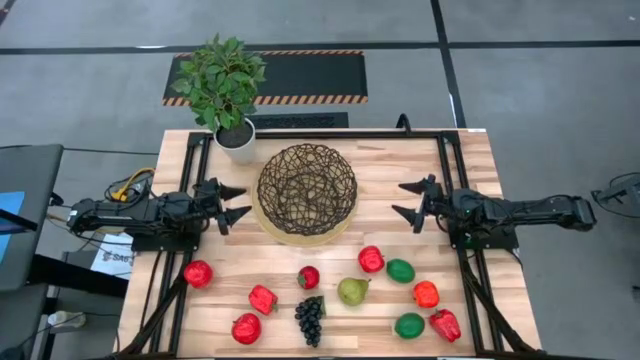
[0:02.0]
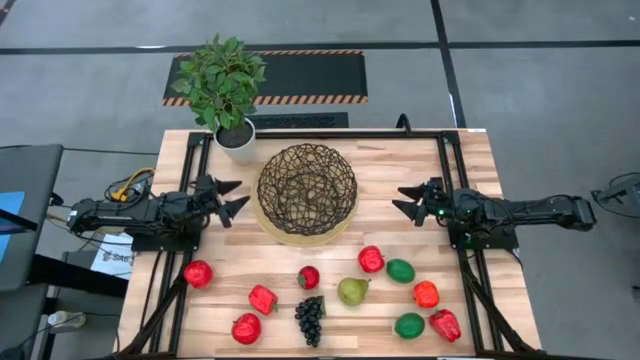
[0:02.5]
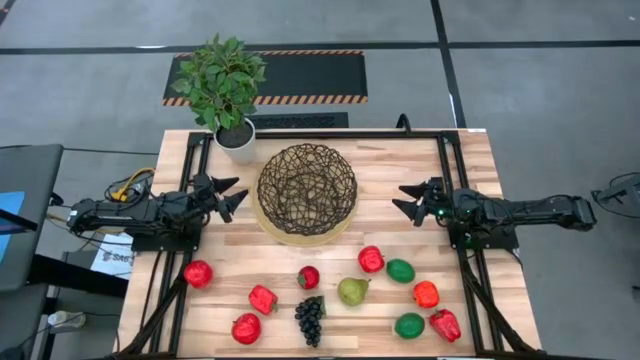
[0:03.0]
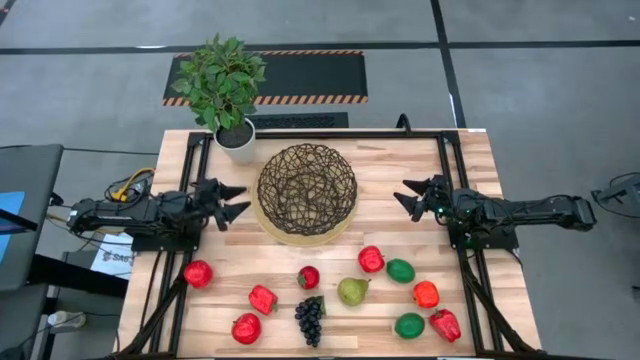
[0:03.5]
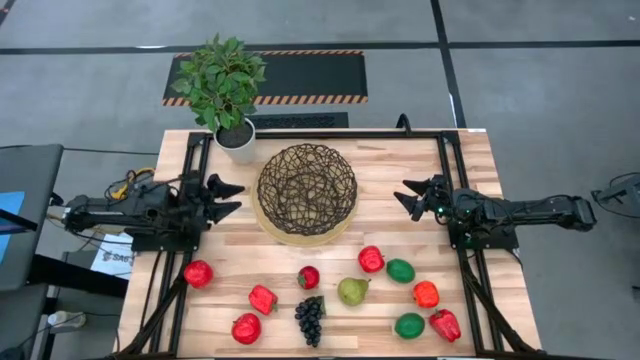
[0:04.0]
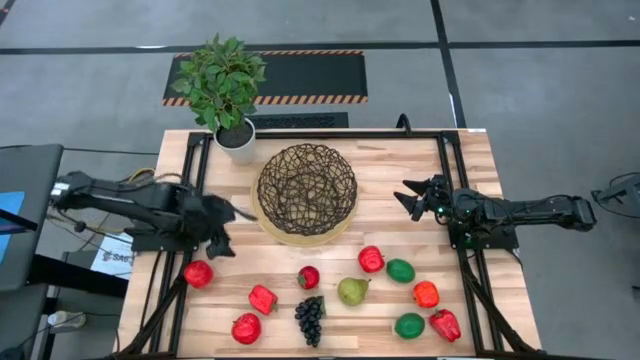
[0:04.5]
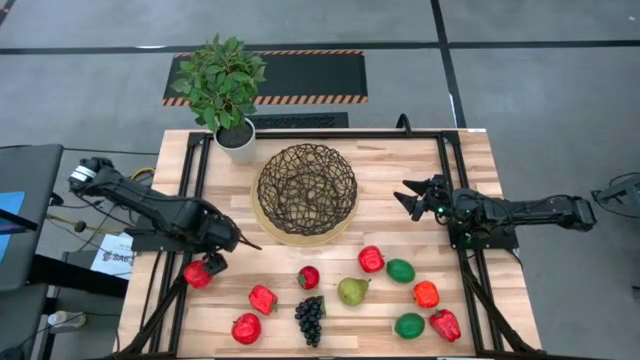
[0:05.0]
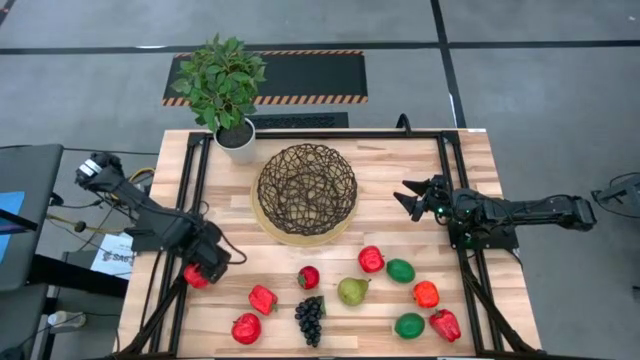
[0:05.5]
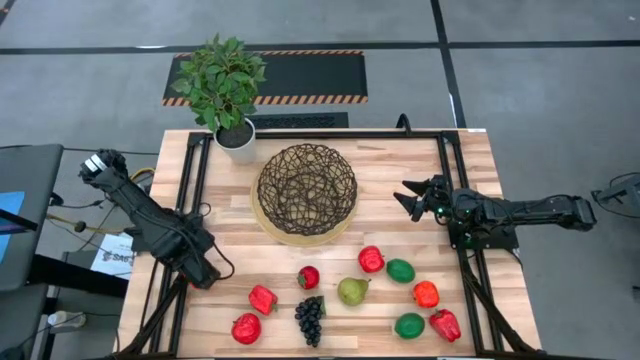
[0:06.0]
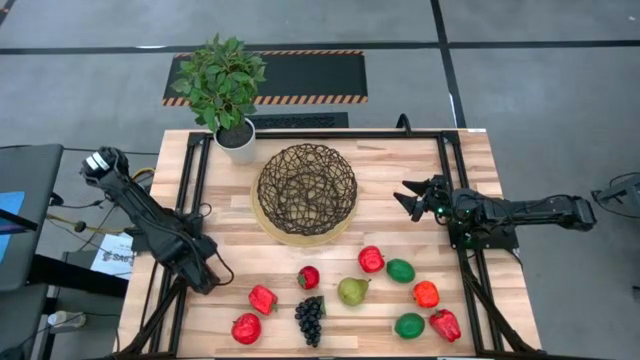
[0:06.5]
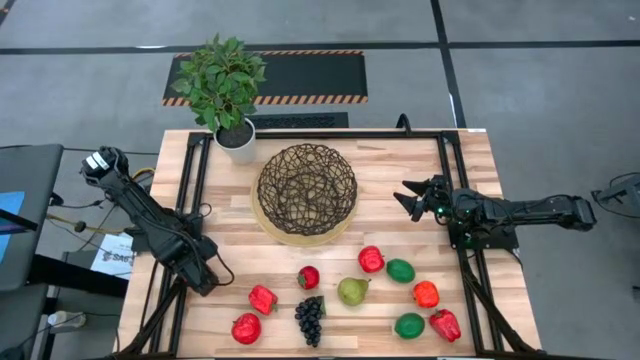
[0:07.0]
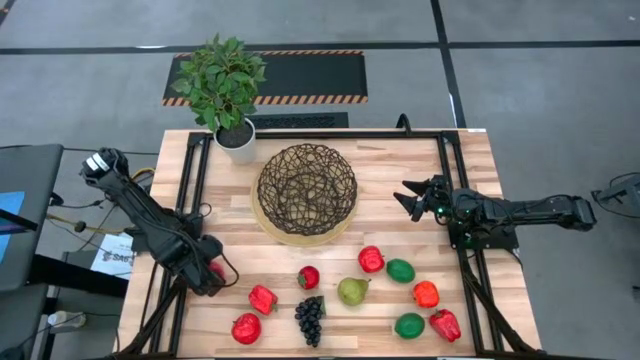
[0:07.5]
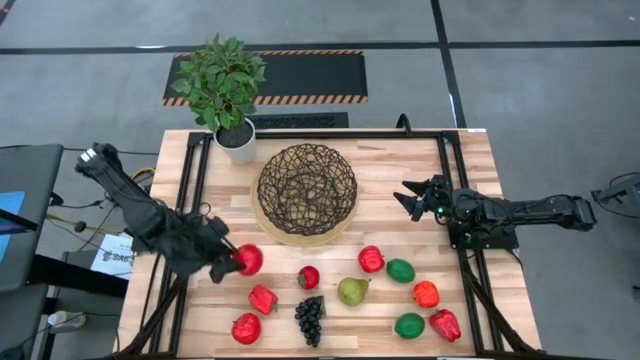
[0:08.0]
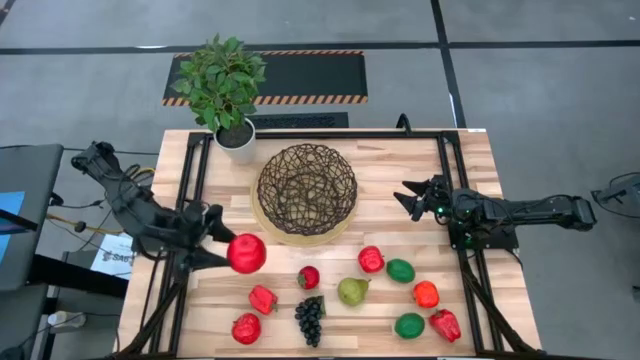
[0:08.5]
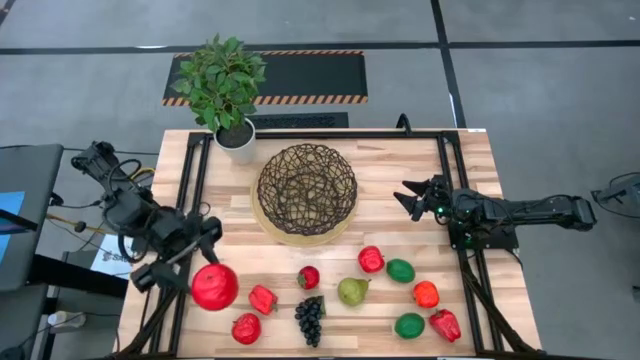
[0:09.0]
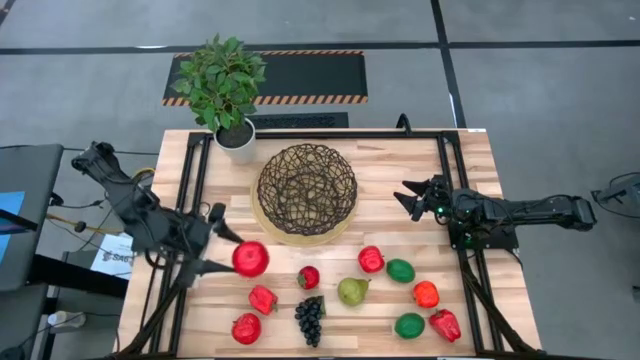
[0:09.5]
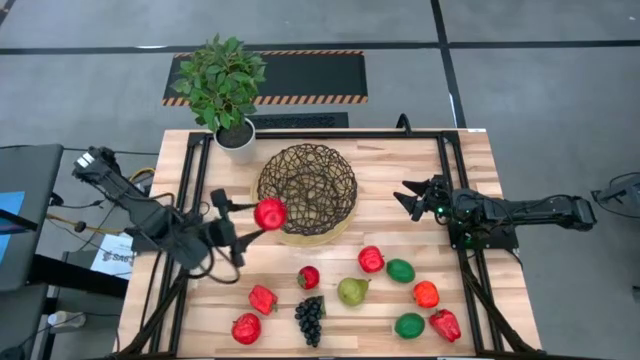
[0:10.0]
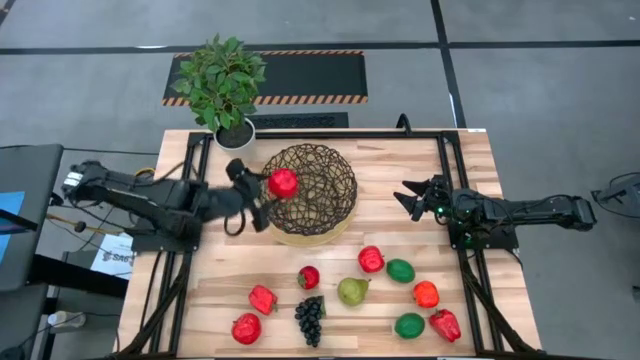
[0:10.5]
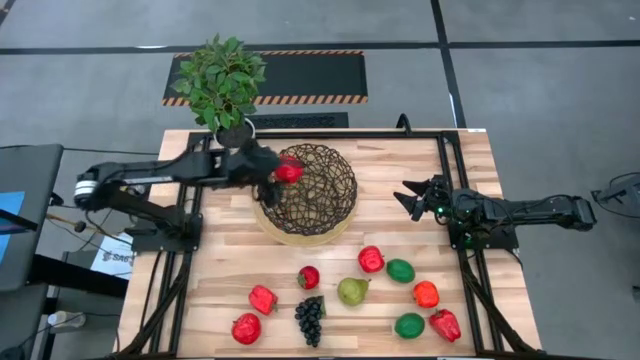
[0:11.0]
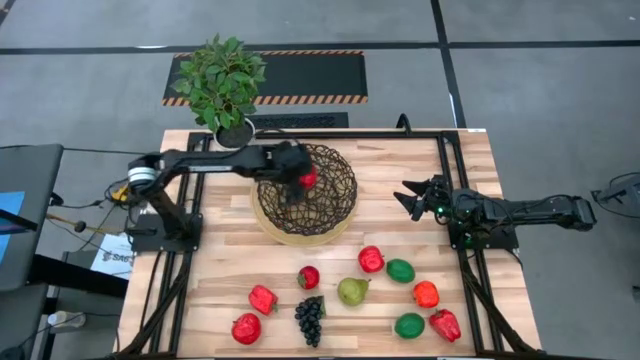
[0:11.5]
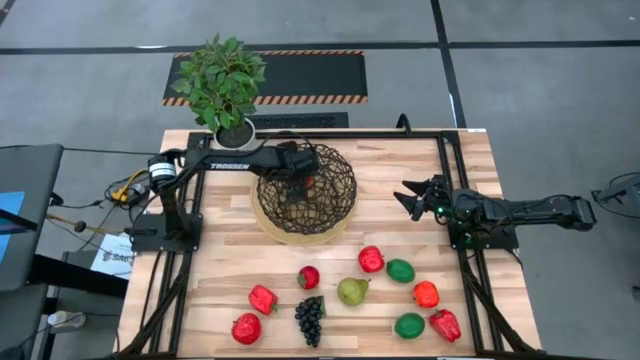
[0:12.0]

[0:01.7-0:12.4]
Task: Build produce basket
Put the toe left red apple into the basket

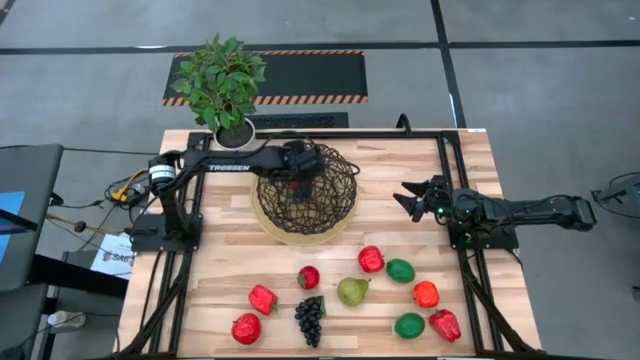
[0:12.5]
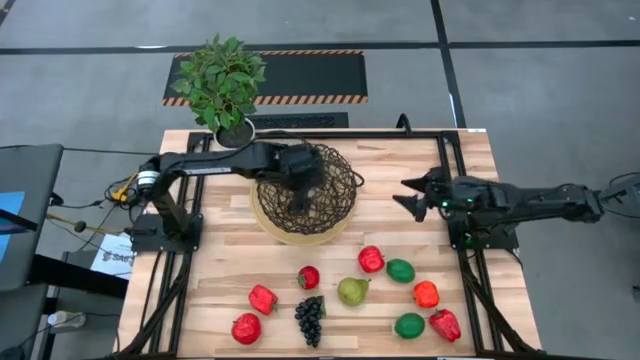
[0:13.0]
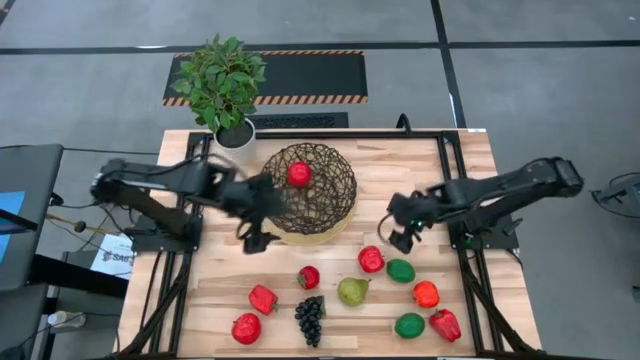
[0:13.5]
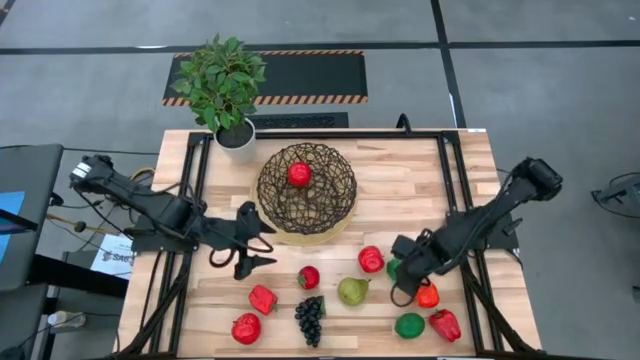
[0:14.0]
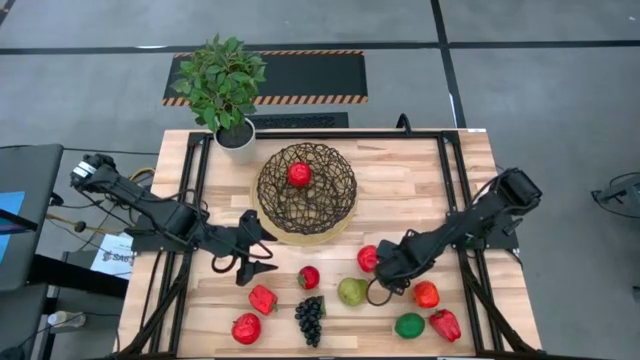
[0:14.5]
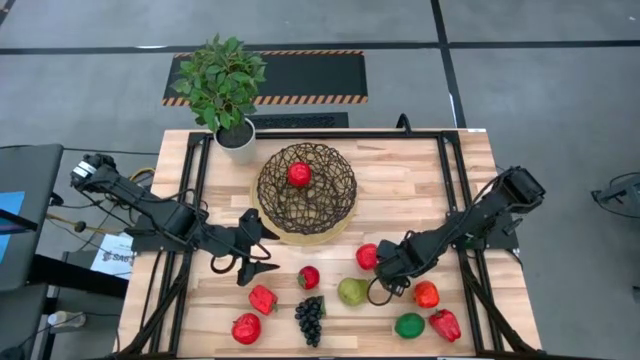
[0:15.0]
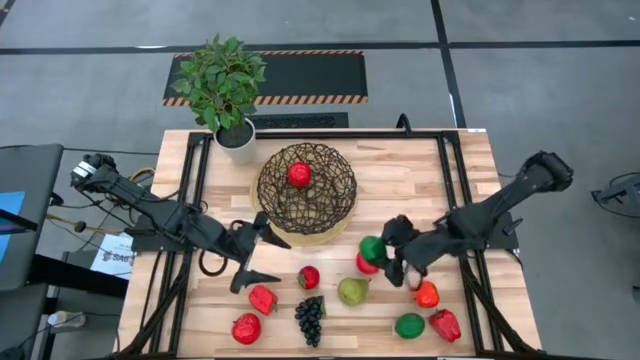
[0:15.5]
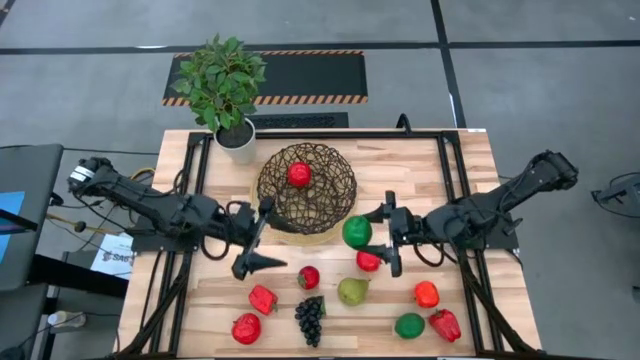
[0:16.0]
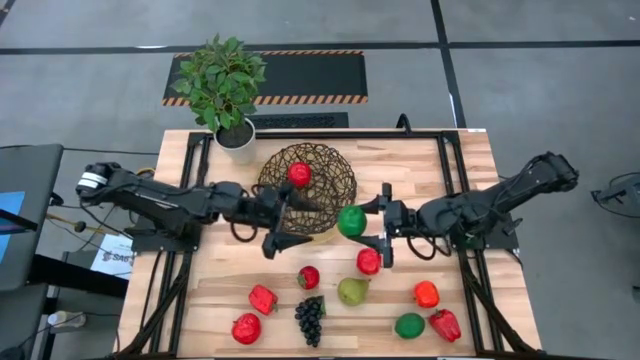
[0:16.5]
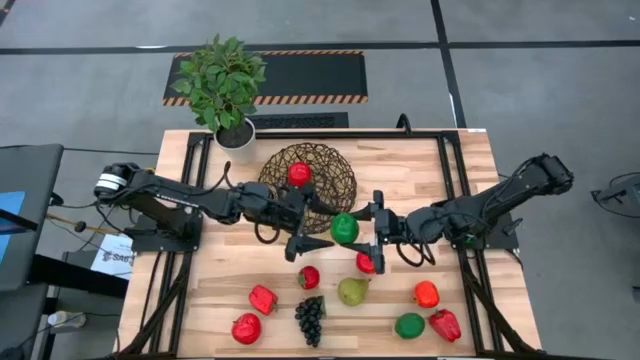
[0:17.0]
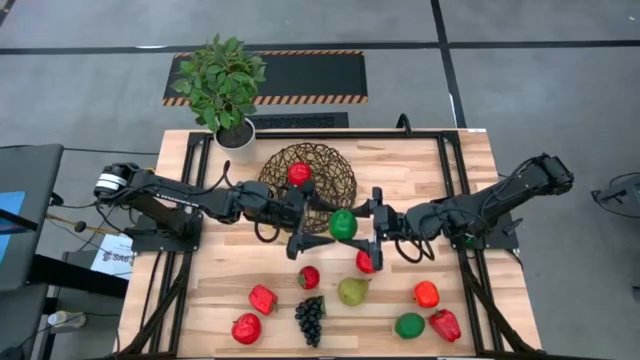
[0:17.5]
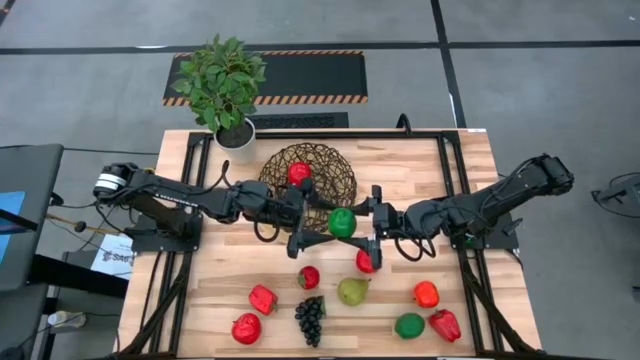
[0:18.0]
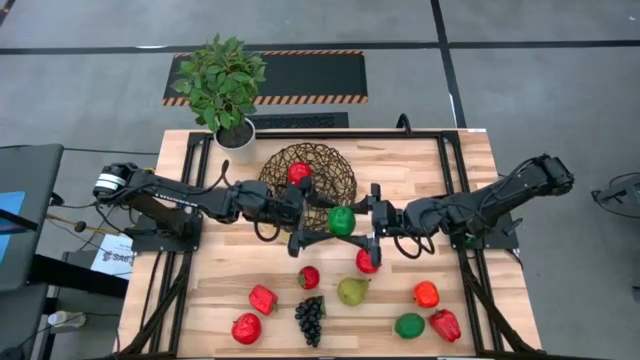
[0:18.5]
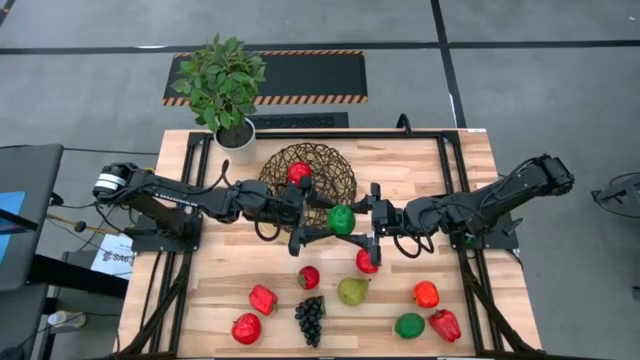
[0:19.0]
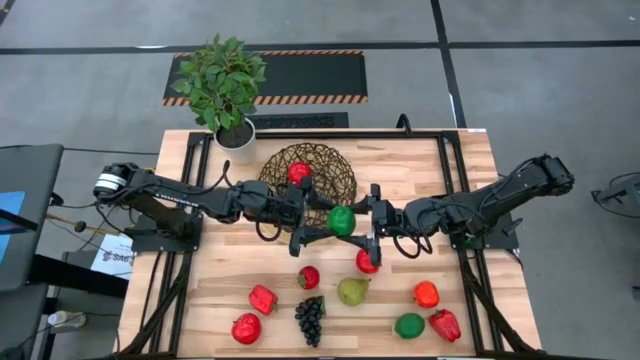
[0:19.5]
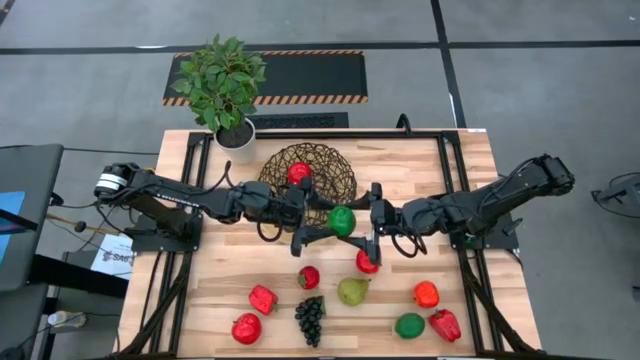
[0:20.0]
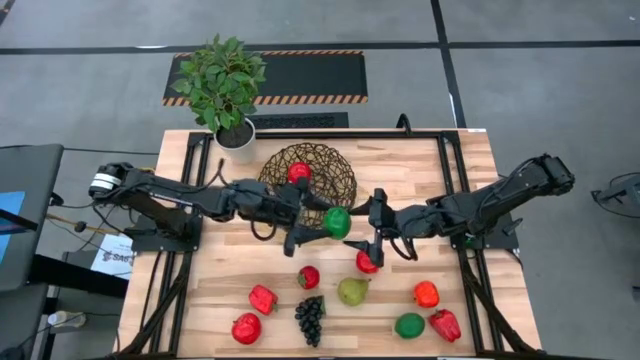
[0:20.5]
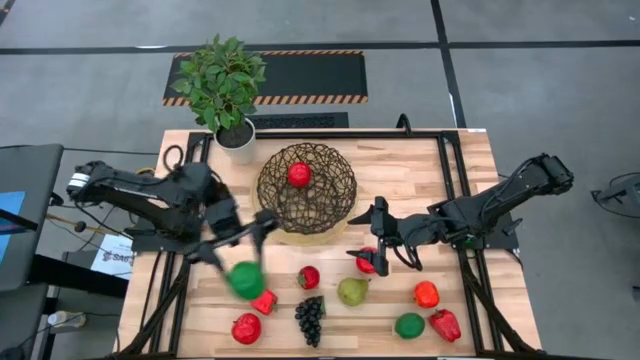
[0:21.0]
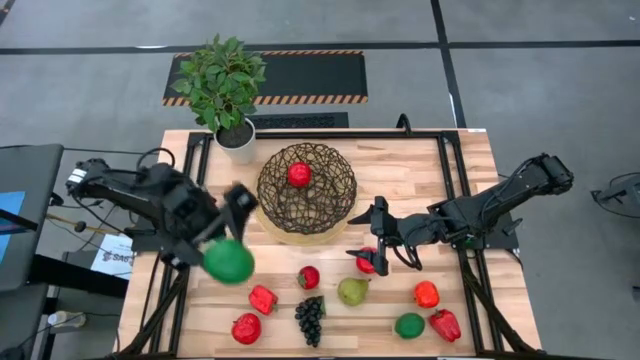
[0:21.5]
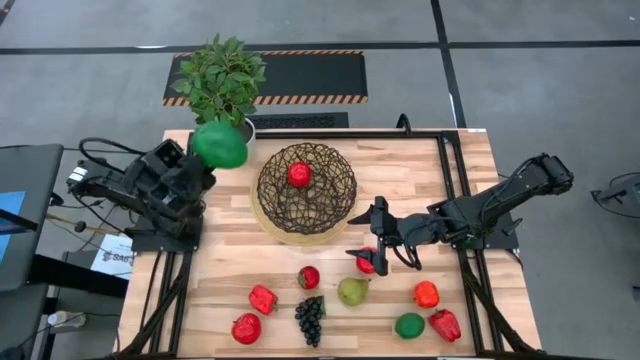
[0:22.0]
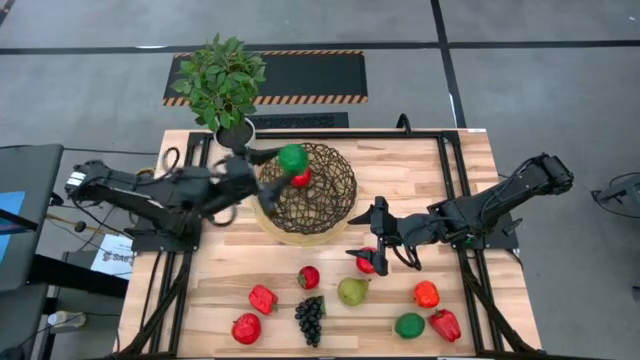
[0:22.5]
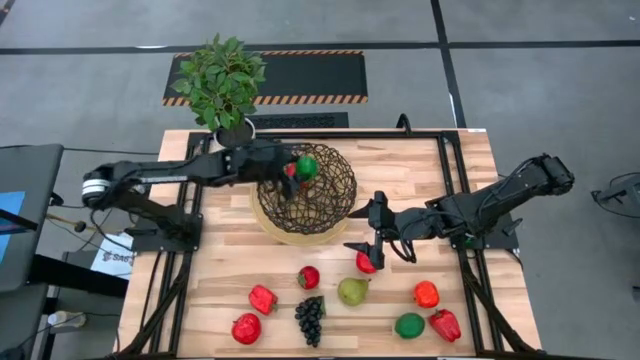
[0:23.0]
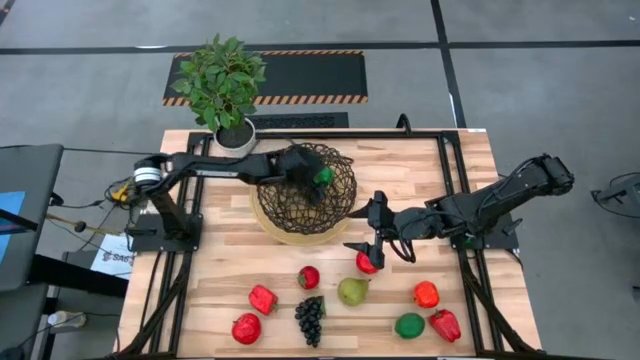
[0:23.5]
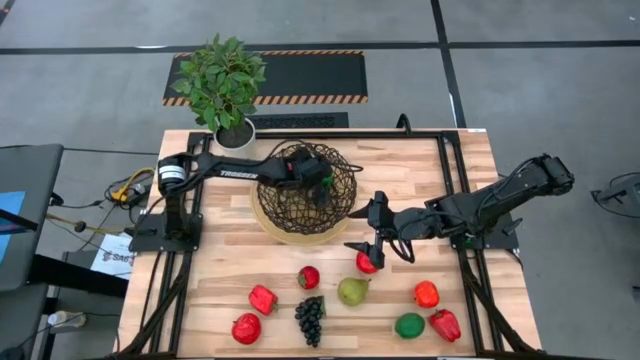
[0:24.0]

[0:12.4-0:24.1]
Put the top green lime into the basket
